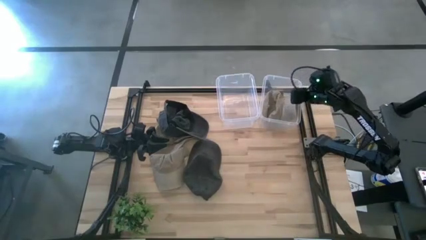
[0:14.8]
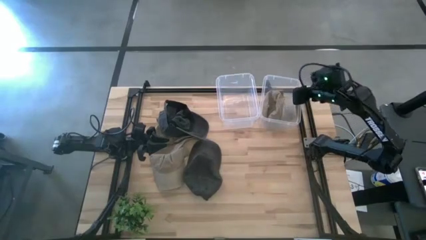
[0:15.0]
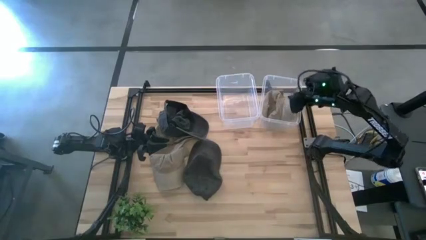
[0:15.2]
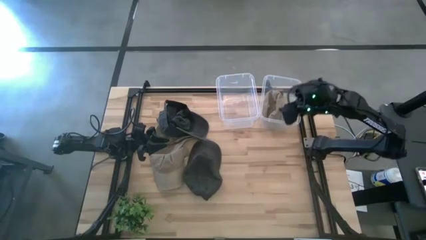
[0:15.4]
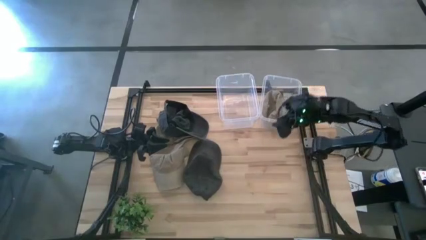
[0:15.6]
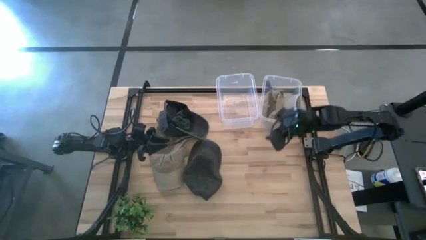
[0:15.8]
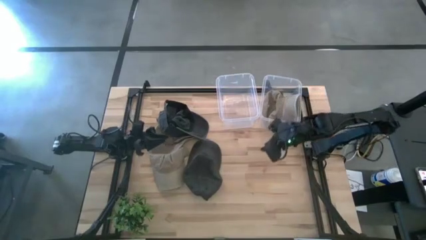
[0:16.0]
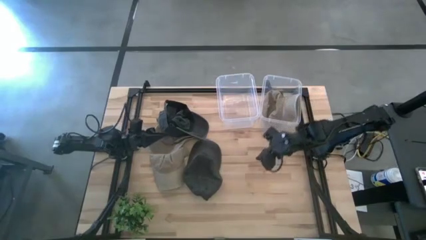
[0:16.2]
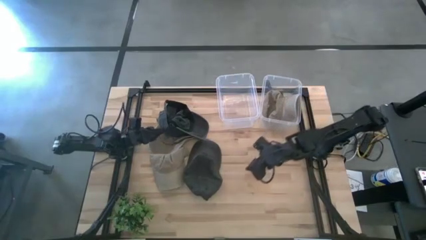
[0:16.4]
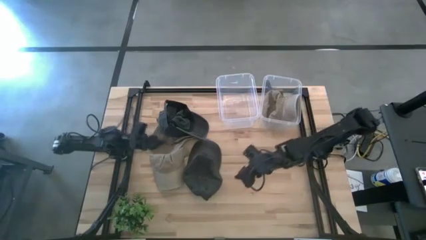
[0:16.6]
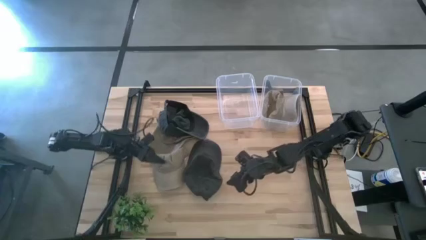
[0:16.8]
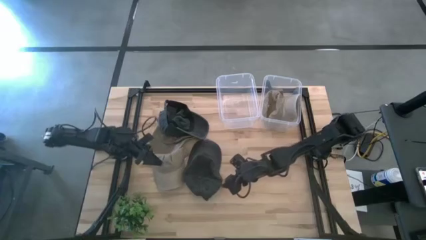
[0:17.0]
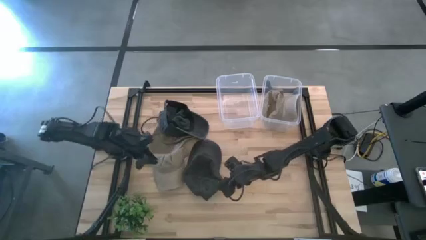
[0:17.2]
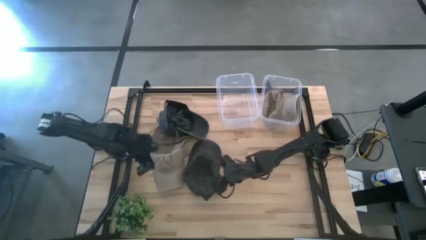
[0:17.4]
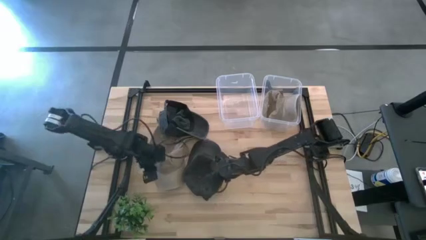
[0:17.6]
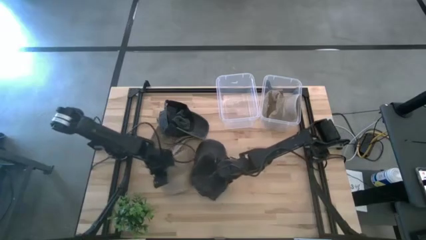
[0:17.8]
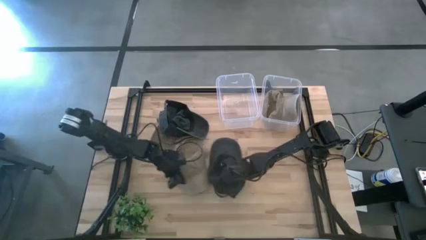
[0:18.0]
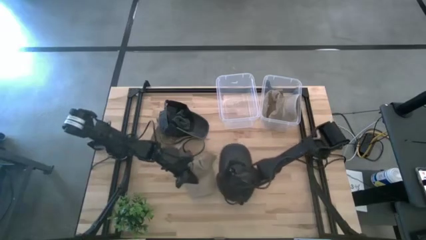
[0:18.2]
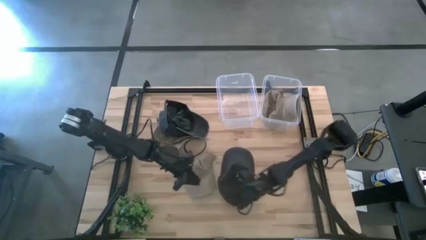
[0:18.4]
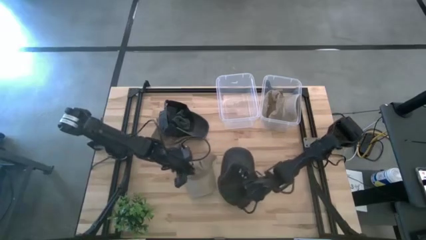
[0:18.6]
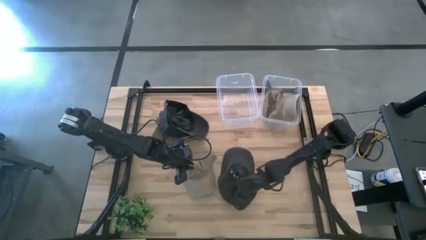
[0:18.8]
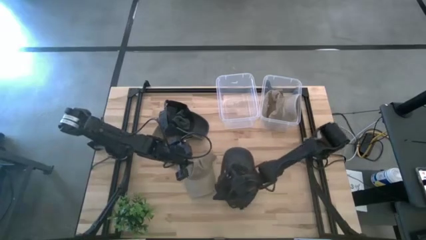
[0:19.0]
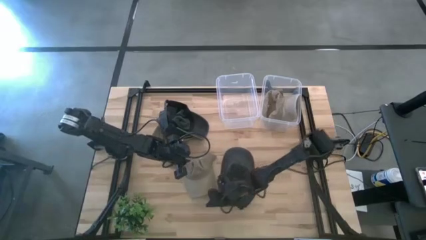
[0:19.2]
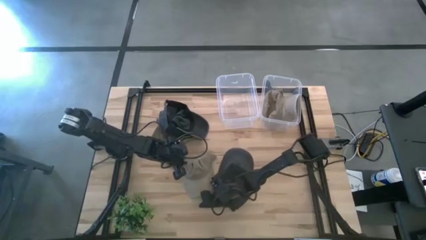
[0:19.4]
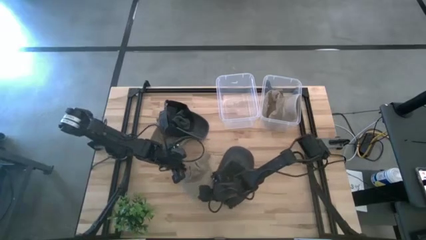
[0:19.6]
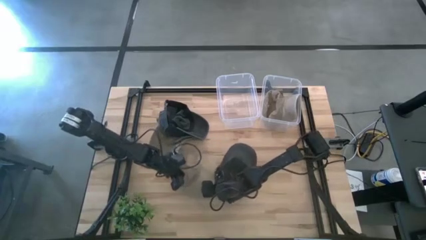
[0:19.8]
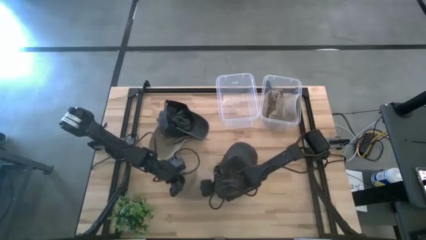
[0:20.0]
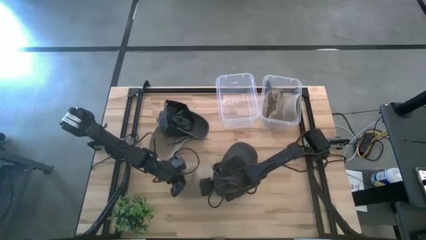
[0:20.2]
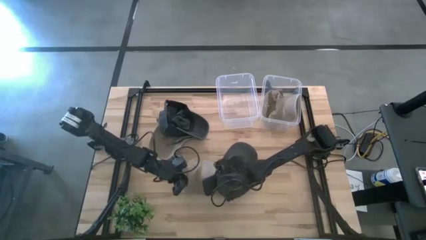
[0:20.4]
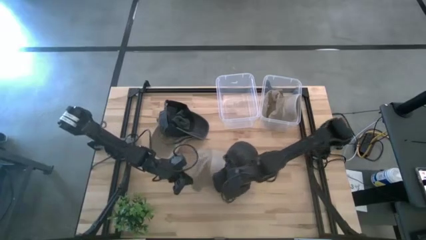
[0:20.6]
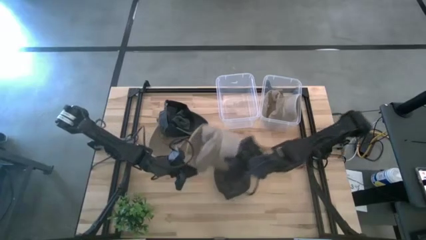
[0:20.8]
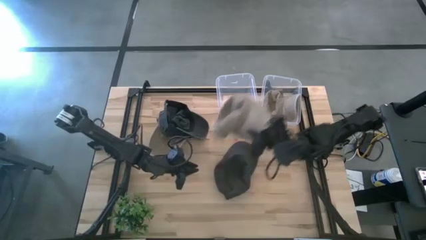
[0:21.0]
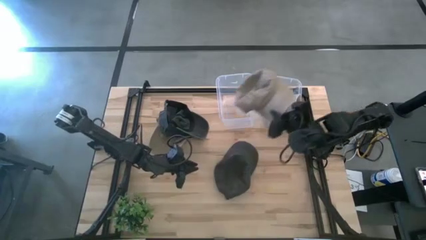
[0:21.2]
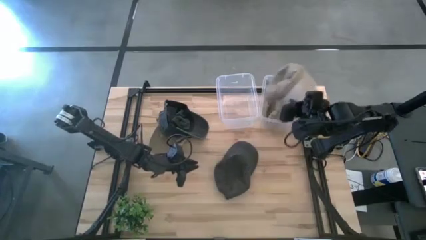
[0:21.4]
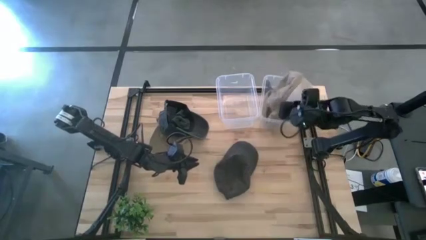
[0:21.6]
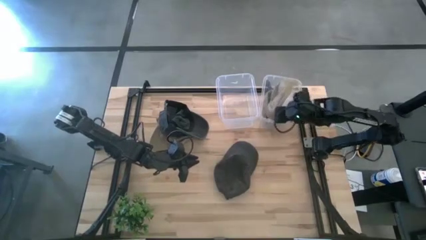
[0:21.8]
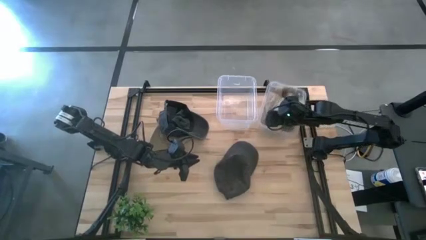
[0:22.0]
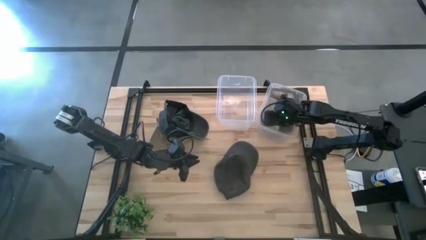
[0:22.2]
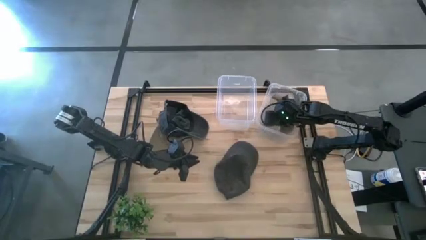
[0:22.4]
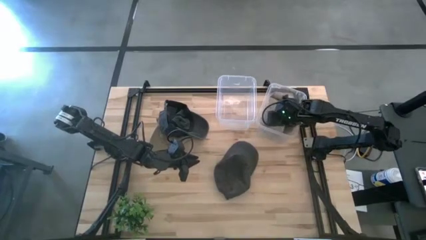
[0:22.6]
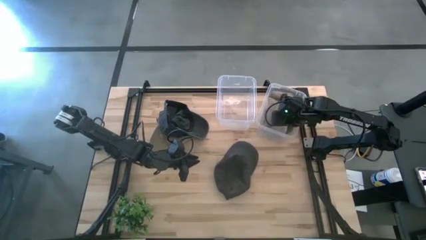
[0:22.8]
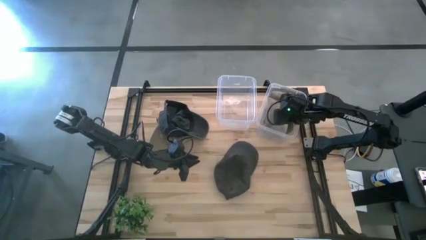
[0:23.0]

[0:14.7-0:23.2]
Task: Pick & Place hat
Put the bottom brown cap into the right transparent bin

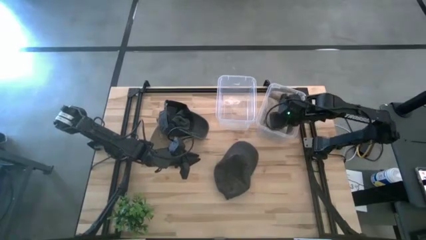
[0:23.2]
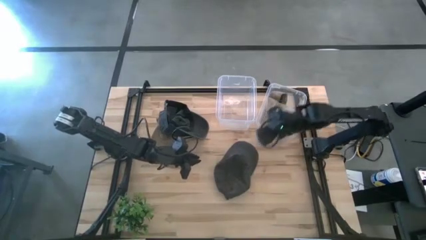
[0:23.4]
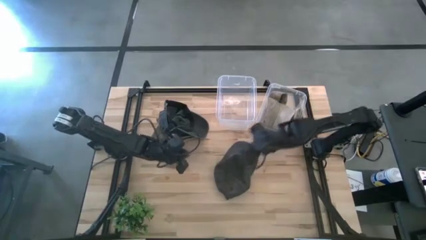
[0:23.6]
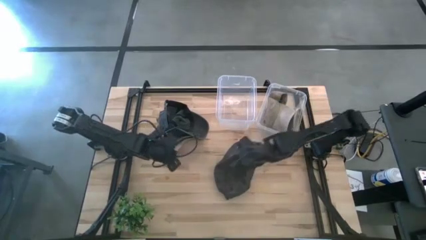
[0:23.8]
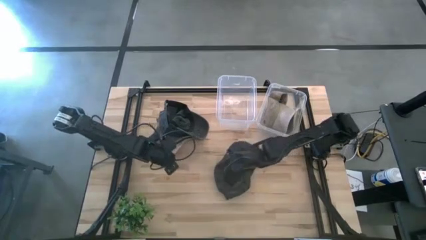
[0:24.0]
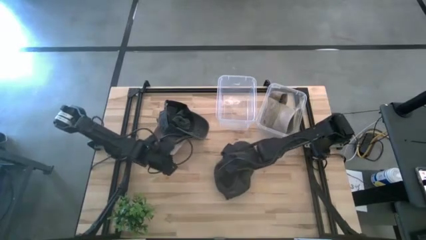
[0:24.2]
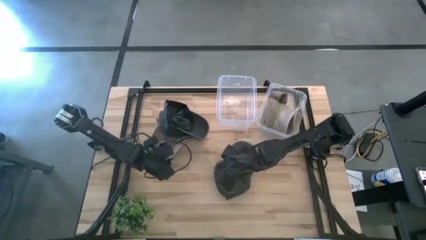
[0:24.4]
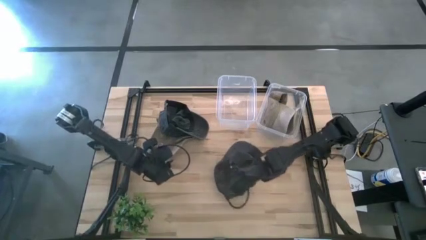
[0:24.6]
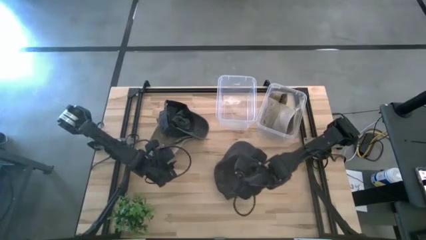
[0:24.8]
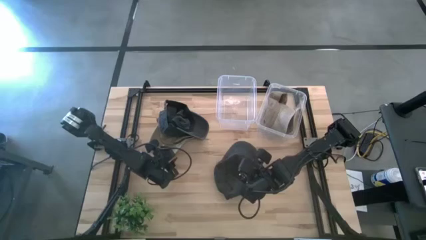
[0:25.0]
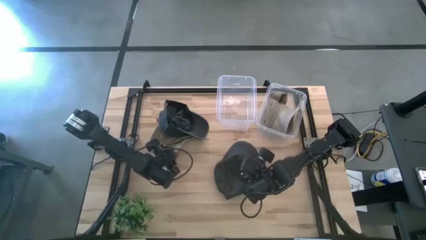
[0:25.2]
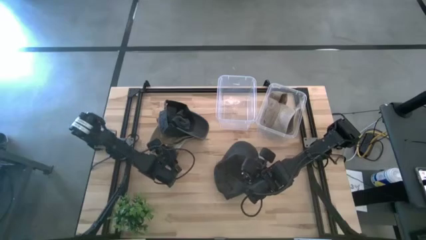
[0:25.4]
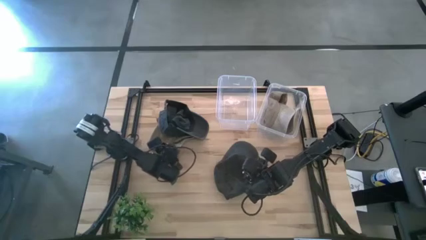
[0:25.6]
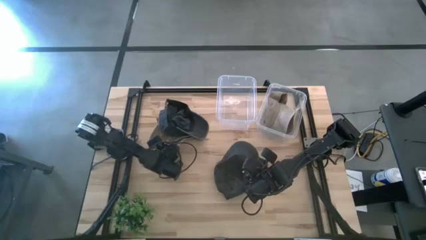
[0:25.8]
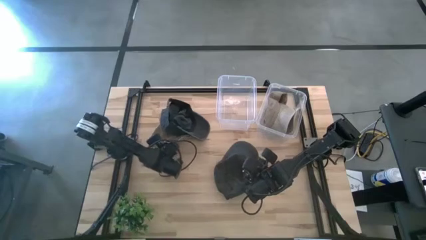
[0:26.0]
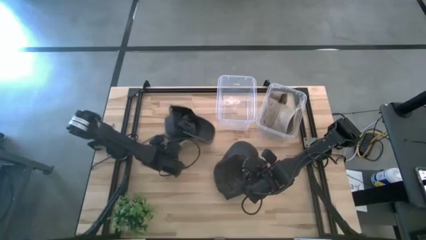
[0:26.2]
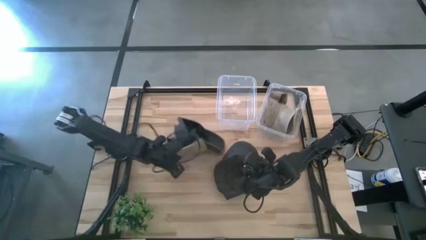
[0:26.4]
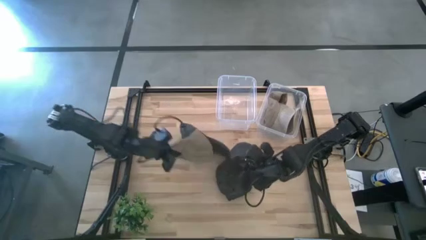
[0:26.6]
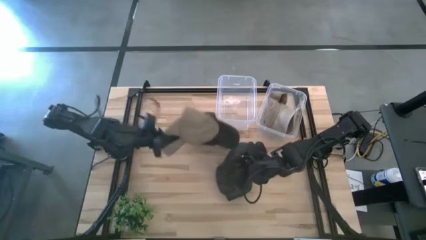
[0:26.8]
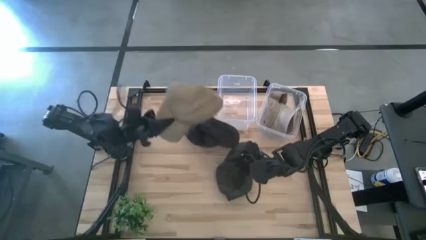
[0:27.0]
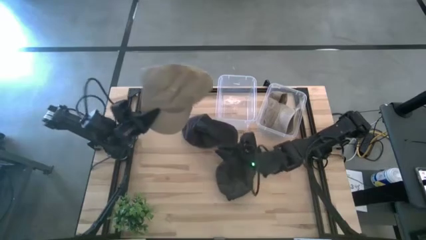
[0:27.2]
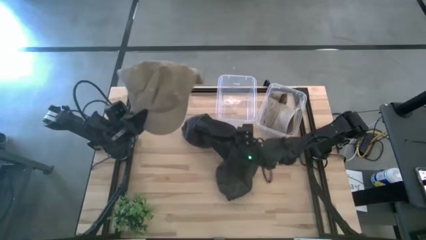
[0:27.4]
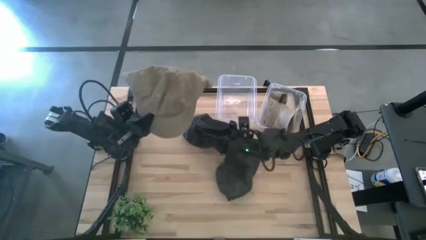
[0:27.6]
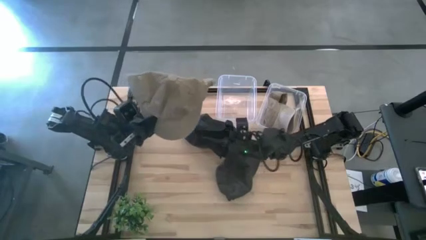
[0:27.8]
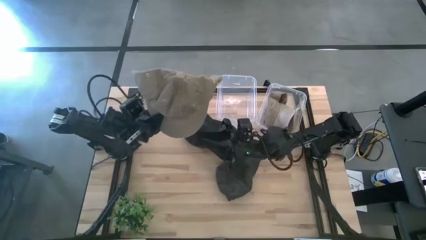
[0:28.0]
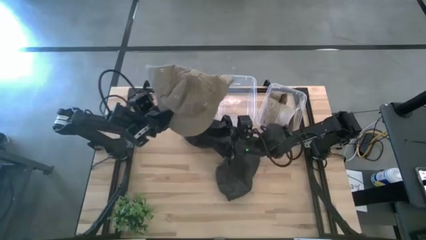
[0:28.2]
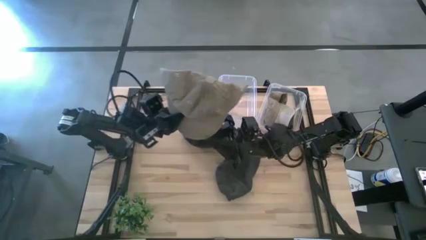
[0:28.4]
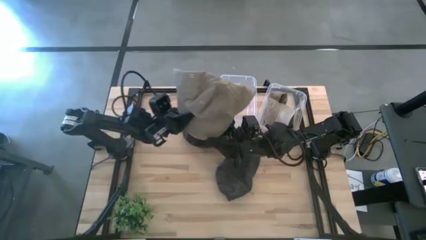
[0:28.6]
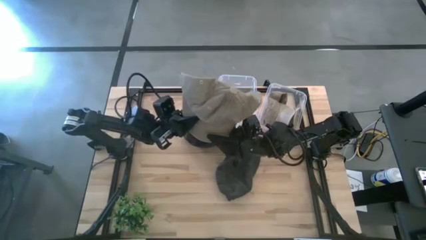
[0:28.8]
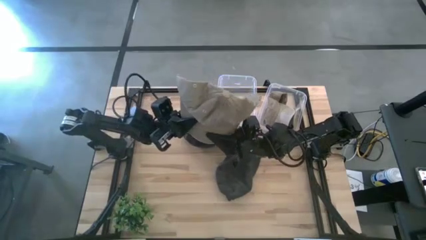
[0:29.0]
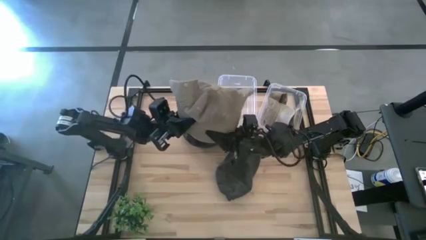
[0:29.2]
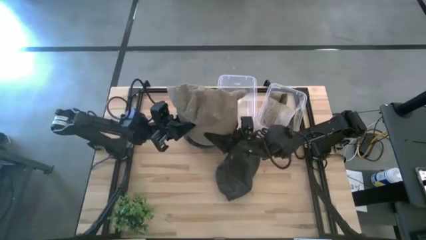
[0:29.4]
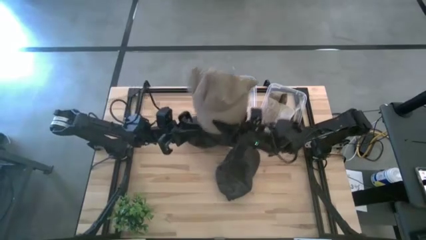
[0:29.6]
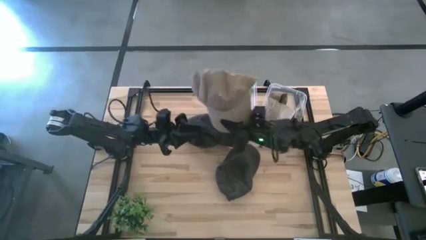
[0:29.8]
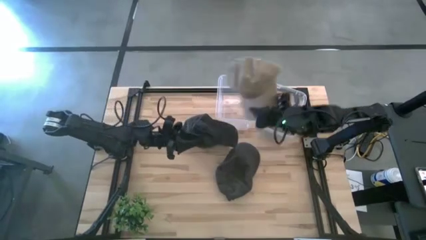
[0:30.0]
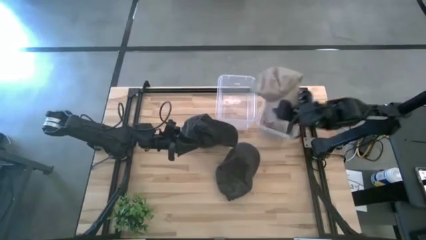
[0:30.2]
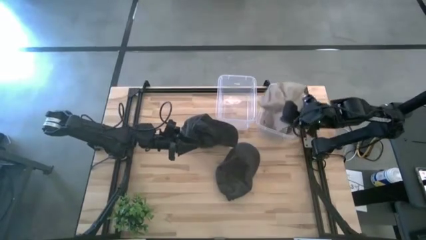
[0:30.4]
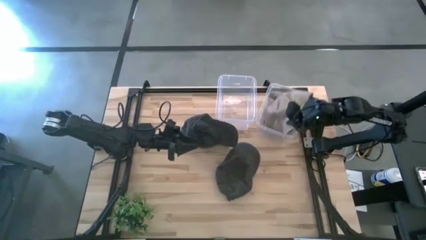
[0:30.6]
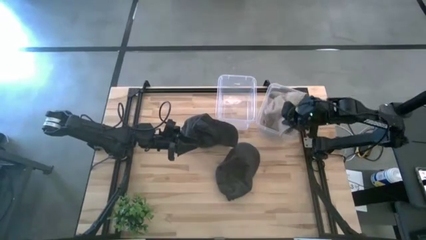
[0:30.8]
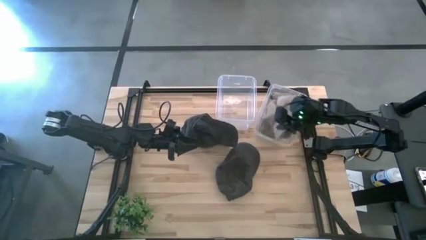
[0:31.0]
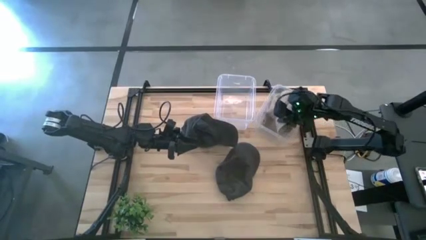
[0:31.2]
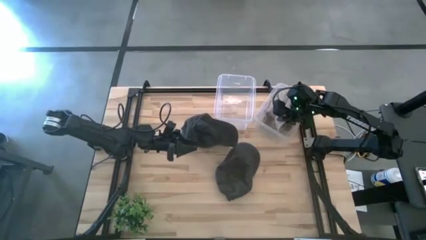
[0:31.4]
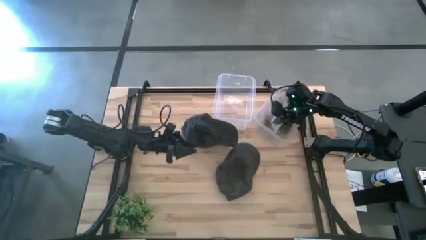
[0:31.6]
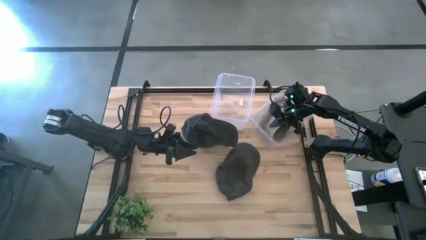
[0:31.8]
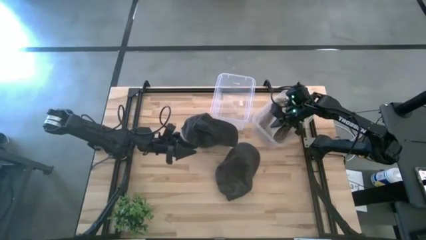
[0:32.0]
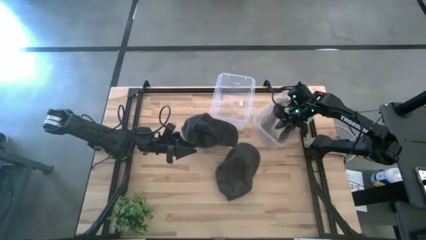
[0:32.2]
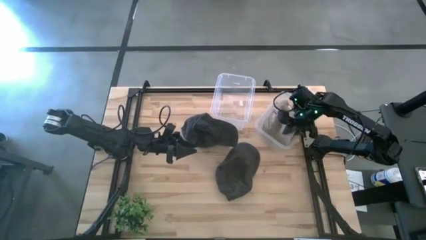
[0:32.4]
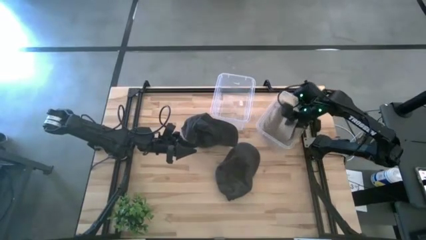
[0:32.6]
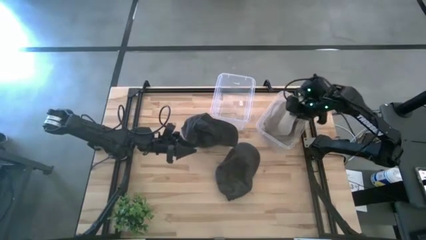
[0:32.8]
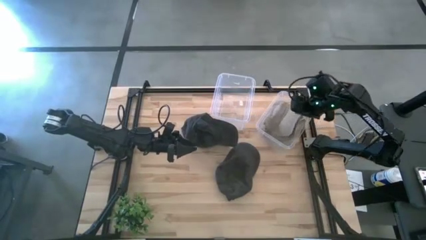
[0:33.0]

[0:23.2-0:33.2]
Put the brown cap into the right transparent bin
